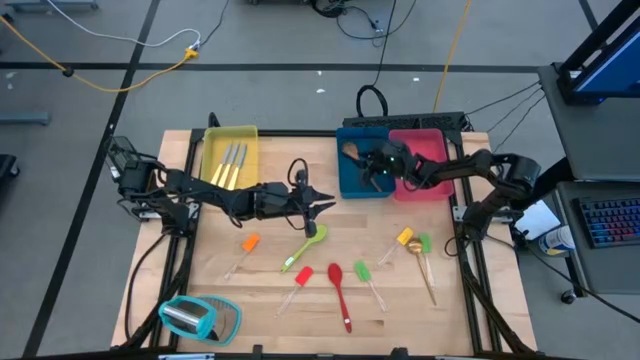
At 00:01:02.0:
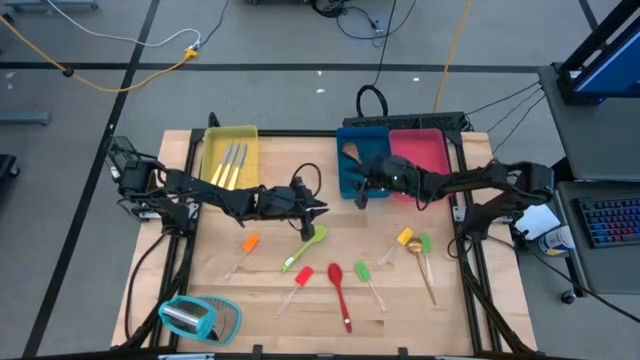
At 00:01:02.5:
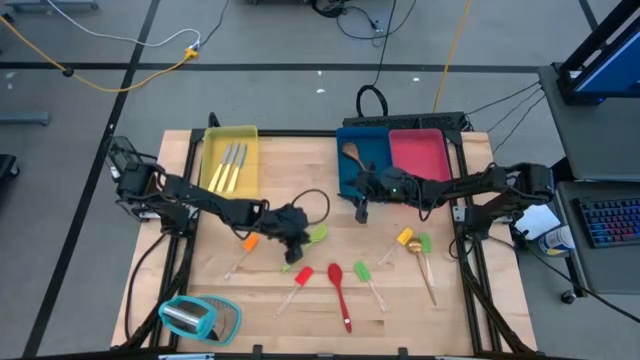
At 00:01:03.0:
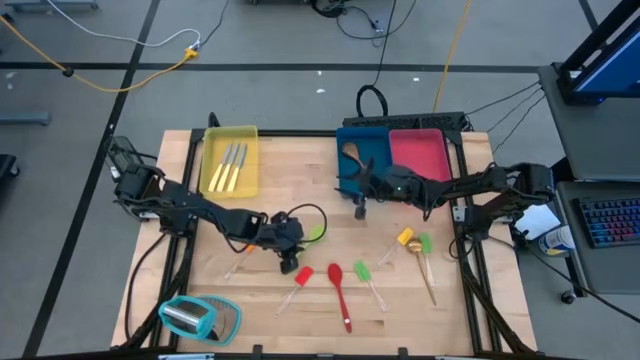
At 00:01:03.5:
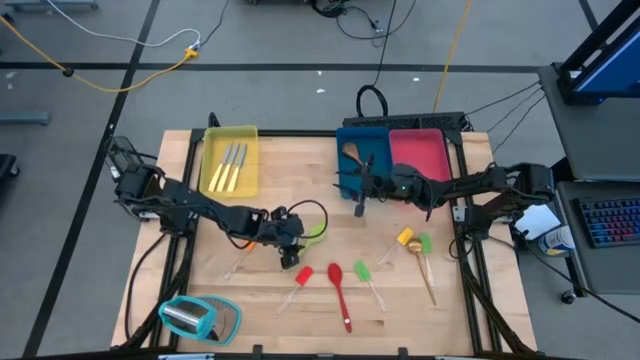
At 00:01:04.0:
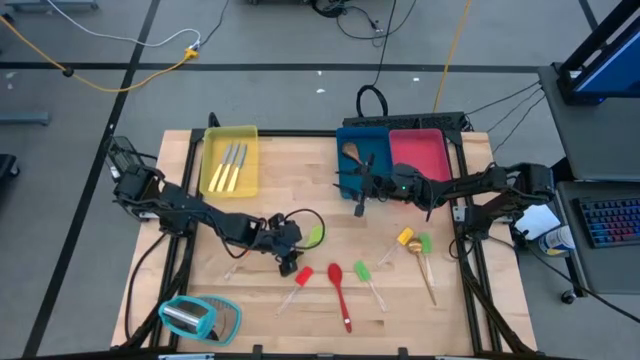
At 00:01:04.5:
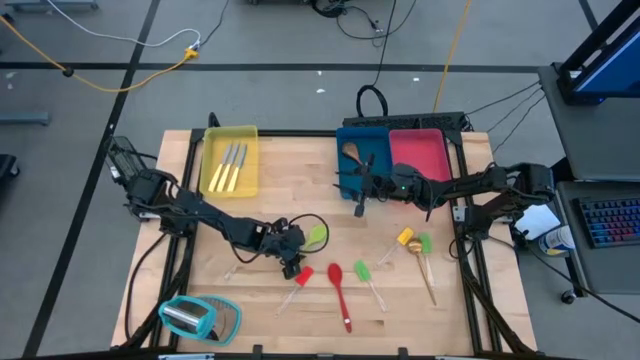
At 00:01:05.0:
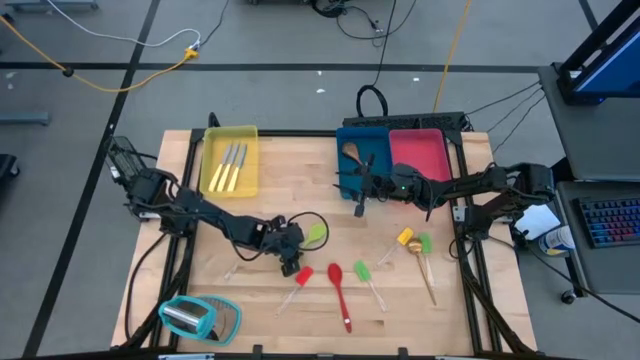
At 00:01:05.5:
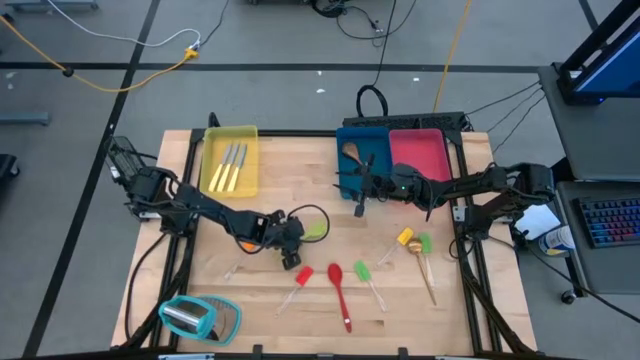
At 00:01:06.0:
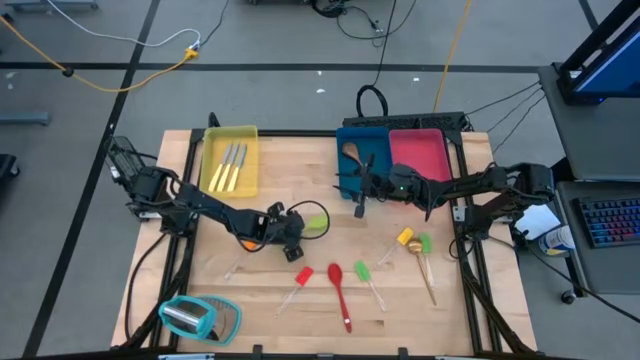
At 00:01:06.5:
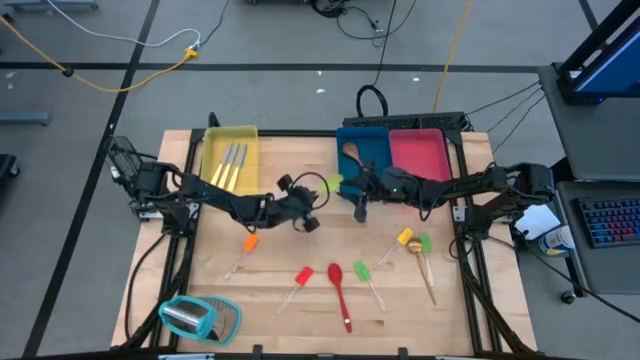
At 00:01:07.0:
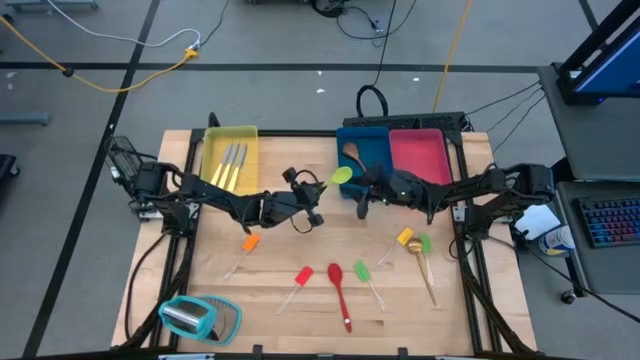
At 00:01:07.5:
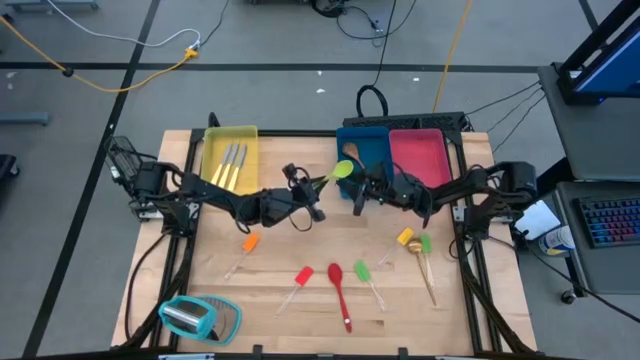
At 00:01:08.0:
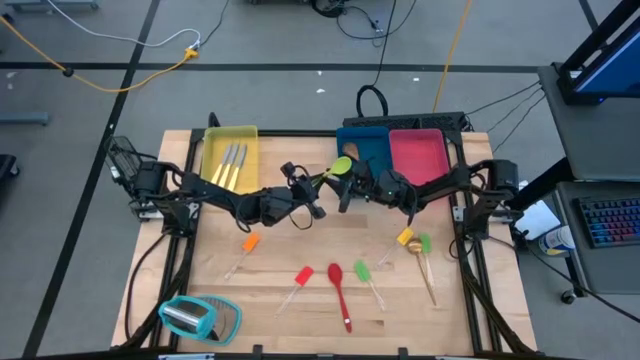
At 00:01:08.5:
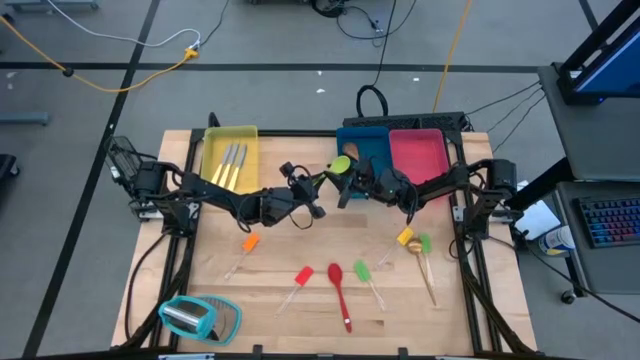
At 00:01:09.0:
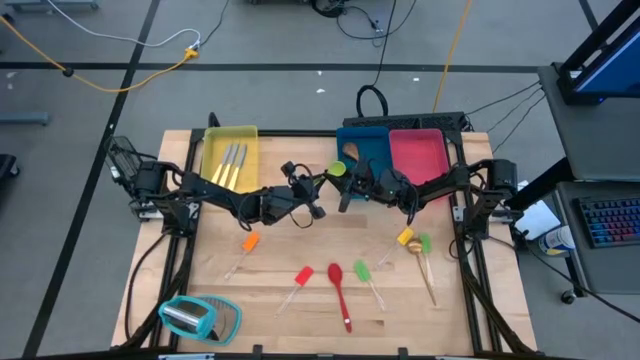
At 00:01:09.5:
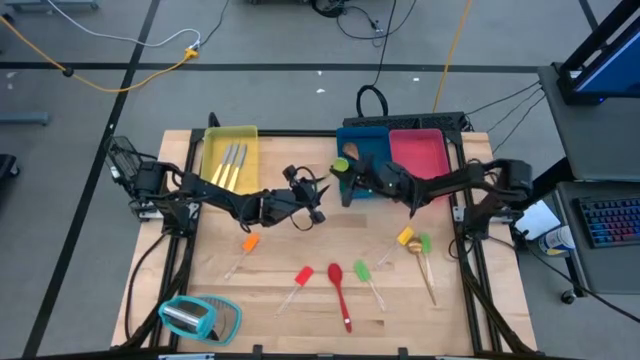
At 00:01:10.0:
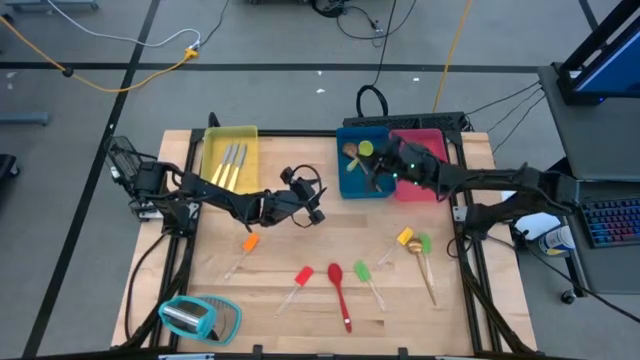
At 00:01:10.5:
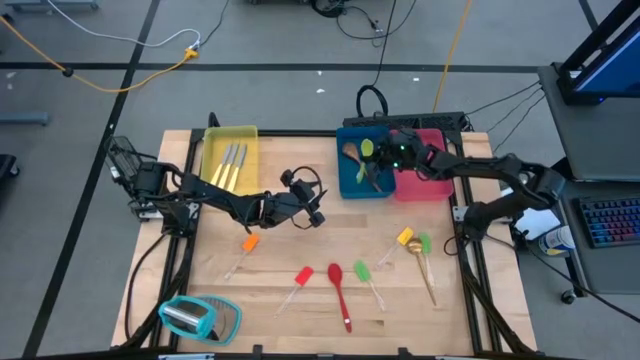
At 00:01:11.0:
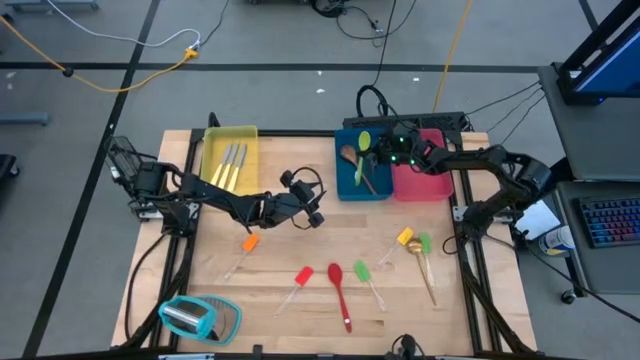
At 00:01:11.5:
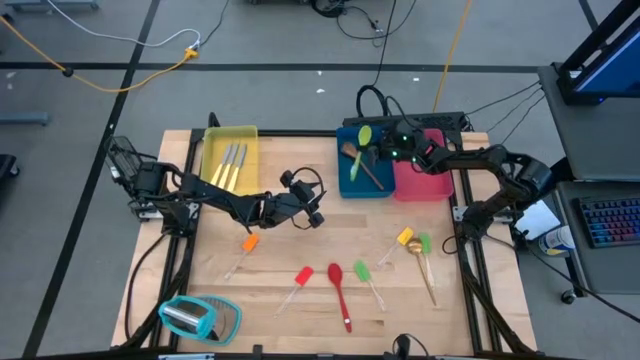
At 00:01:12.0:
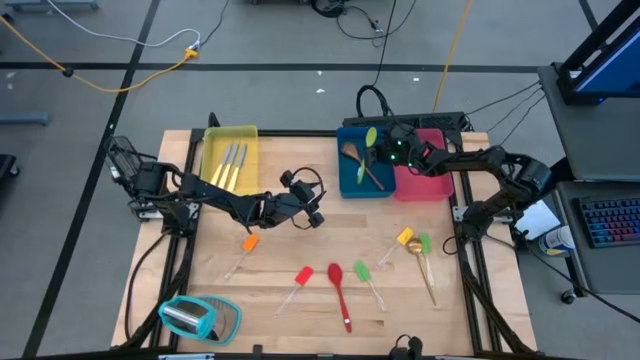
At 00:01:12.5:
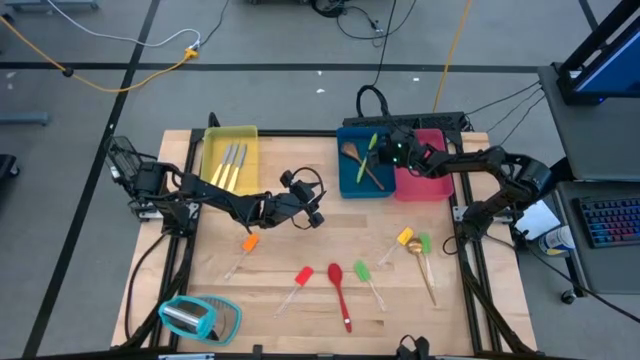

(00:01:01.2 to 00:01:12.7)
Task: Pick & Place Kitchen Items
Put the green serving spoon into the blue bin

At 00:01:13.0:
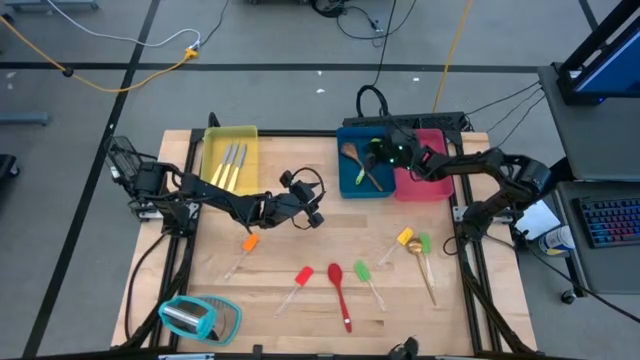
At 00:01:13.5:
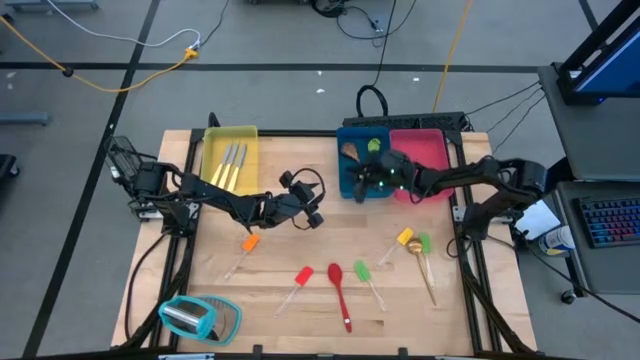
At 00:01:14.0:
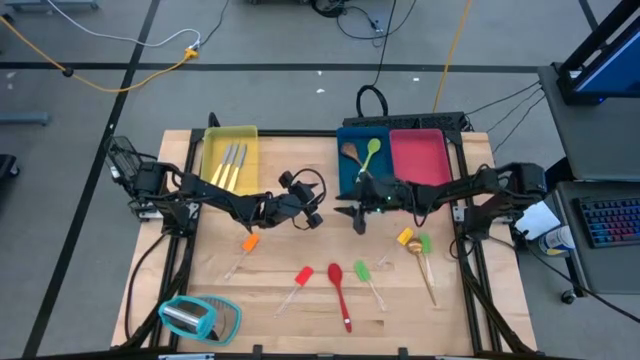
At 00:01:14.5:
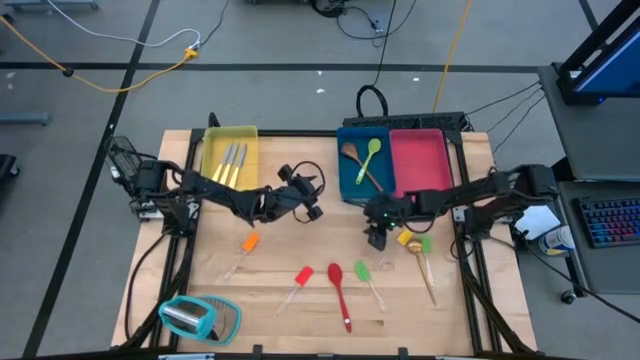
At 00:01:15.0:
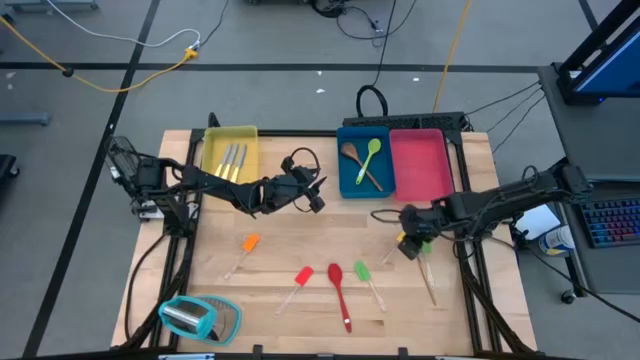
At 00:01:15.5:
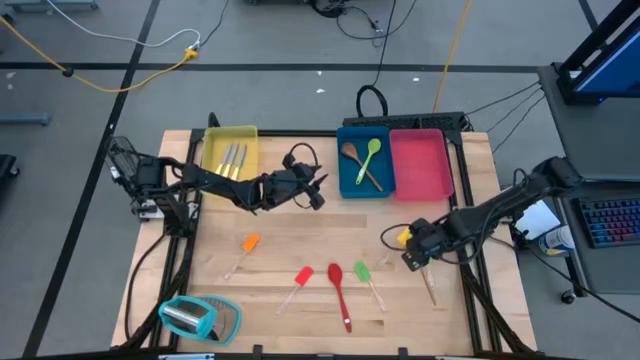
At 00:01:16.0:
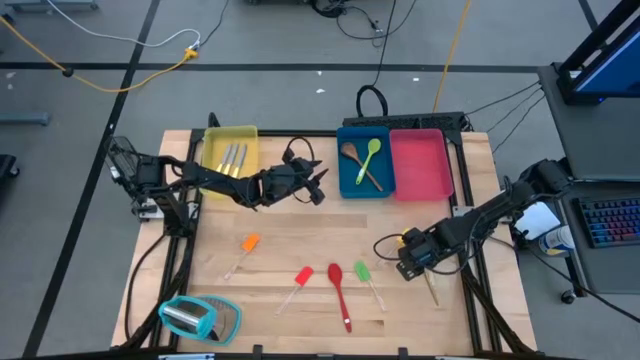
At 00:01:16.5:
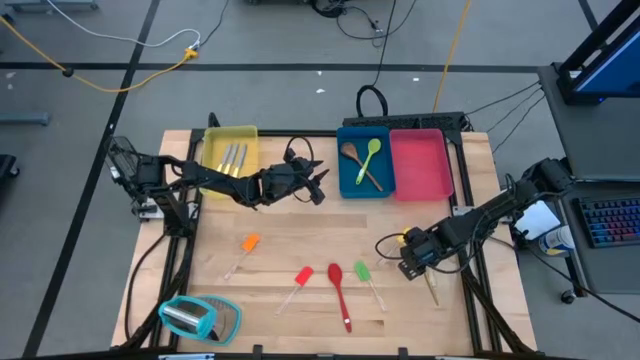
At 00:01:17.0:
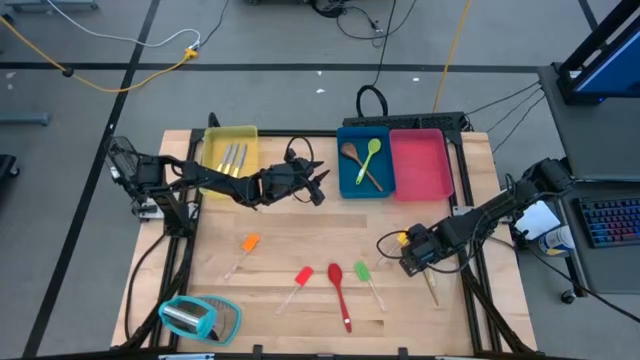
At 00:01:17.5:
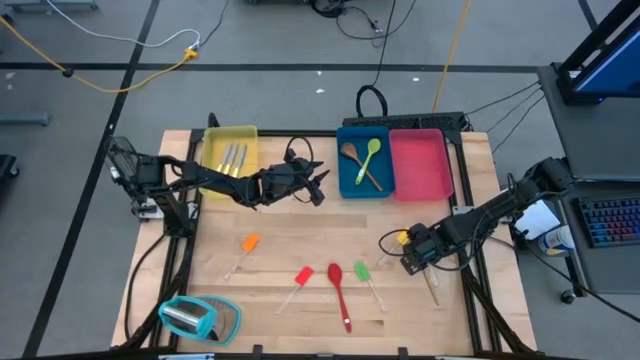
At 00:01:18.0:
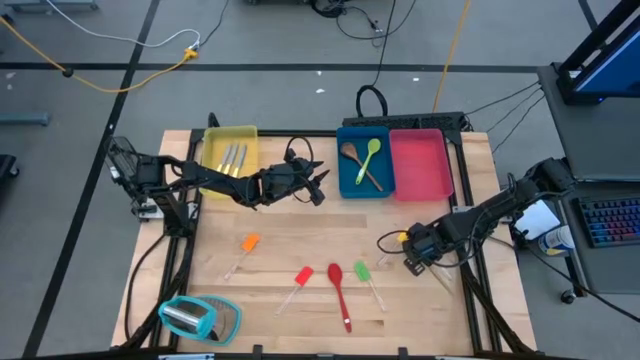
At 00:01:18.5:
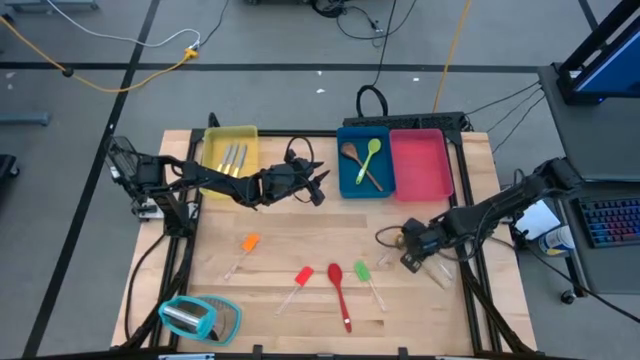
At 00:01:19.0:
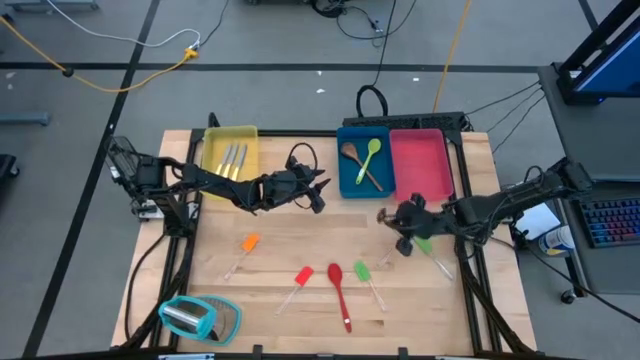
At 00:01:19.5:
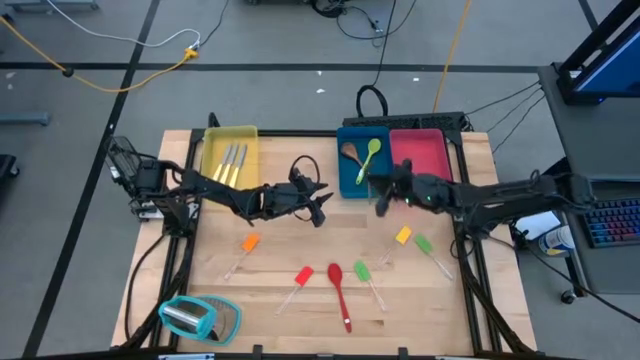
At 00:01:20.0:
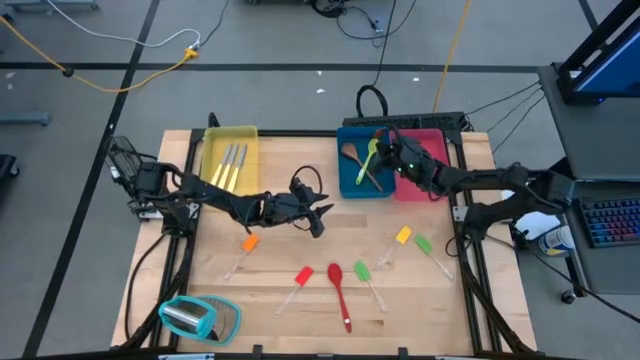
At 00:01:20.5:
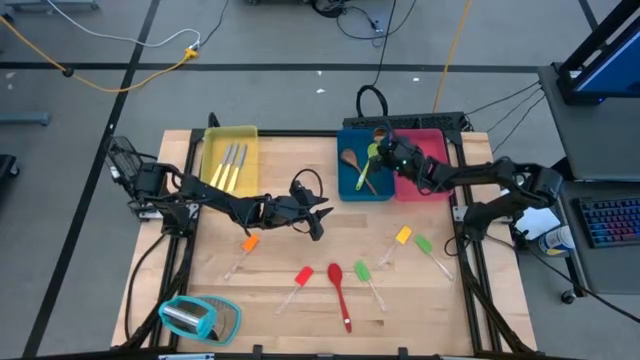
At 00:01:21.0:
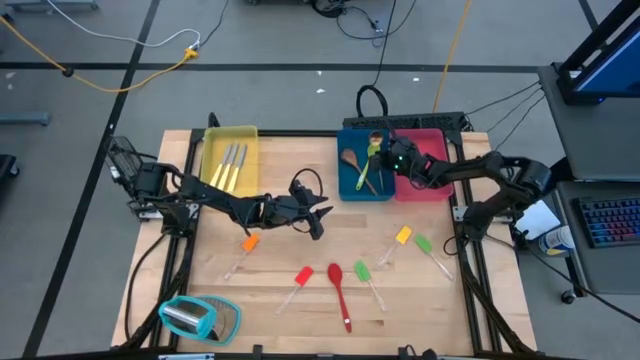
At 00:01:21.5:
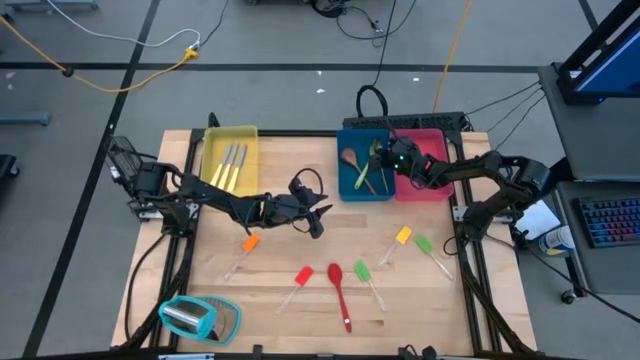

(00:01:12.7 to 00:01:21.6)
Put the gold serving spoon into the blue bin
